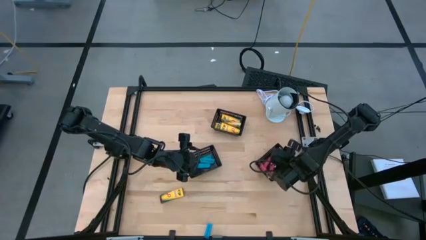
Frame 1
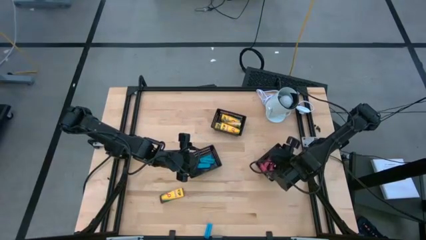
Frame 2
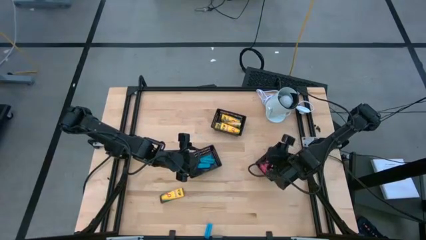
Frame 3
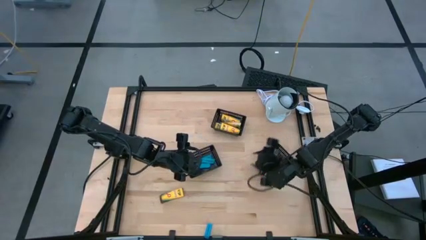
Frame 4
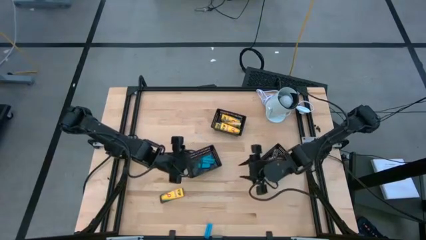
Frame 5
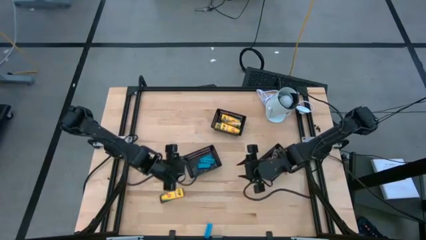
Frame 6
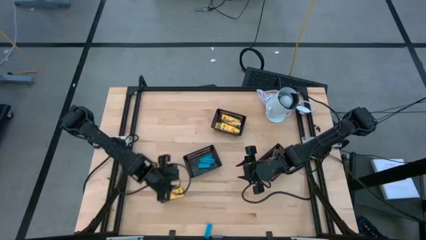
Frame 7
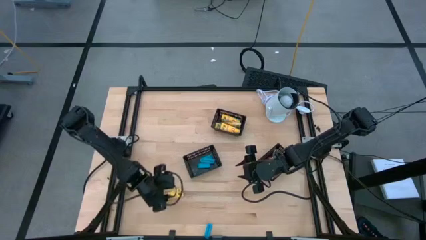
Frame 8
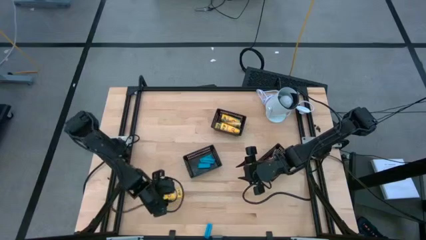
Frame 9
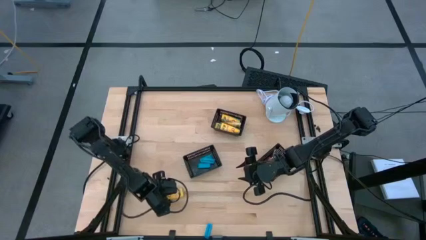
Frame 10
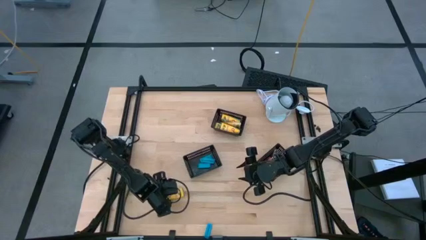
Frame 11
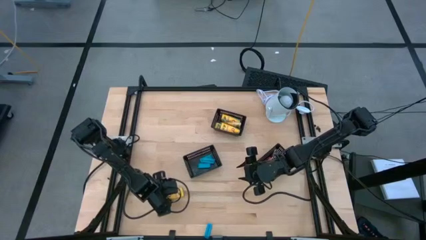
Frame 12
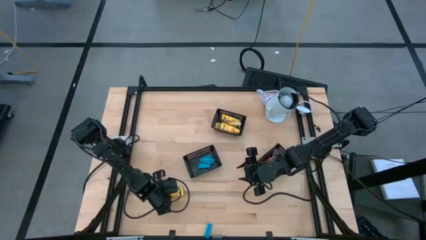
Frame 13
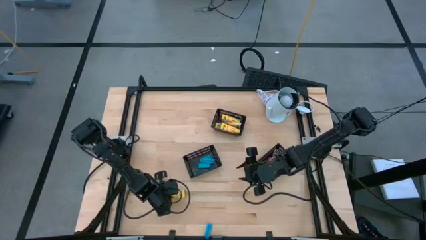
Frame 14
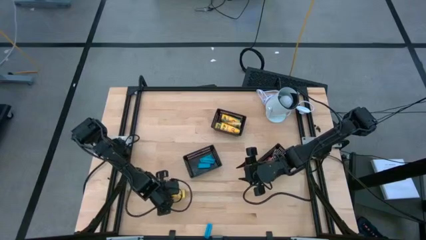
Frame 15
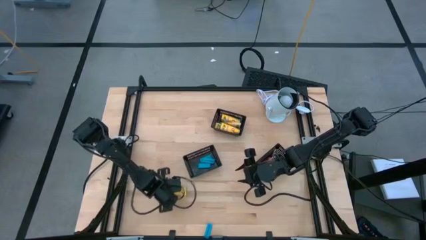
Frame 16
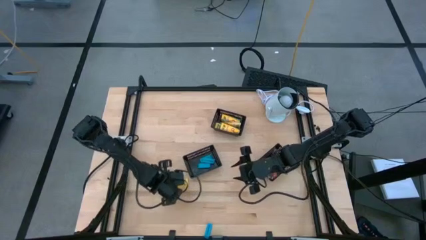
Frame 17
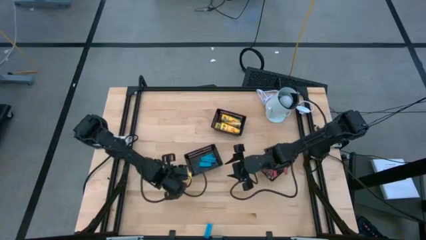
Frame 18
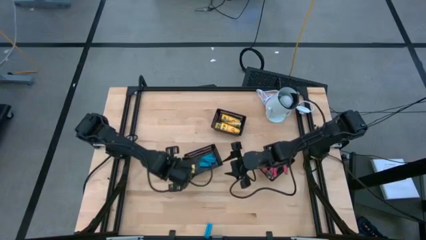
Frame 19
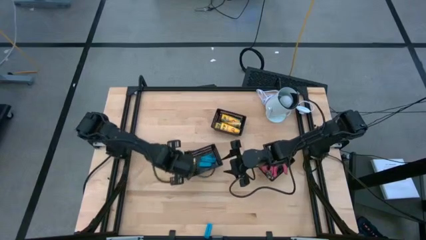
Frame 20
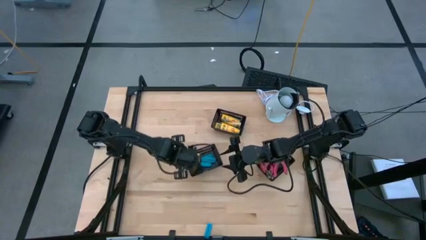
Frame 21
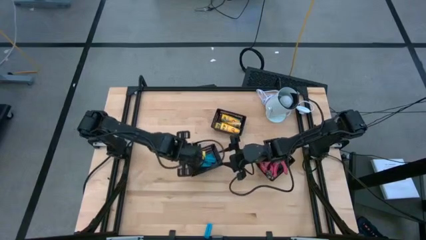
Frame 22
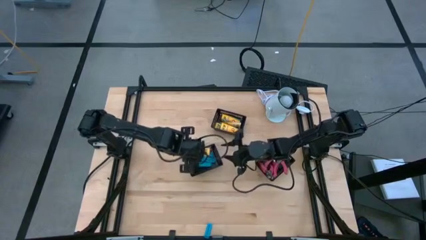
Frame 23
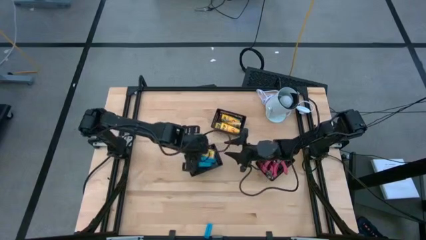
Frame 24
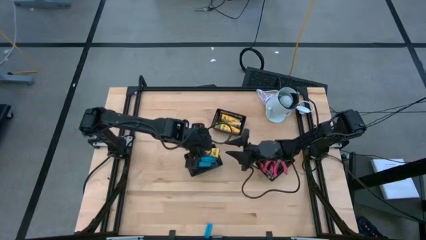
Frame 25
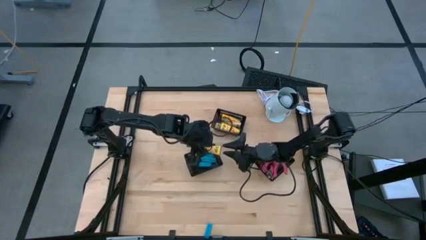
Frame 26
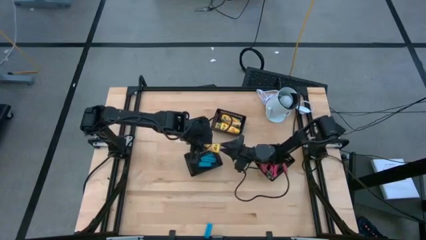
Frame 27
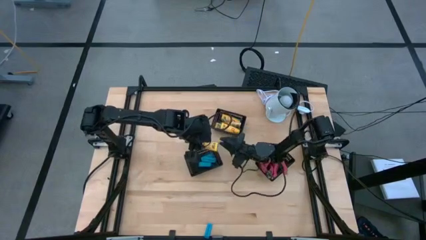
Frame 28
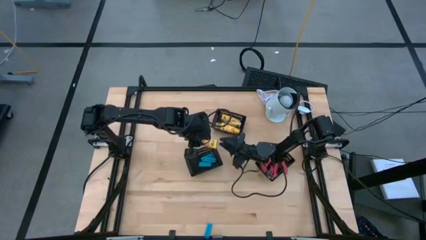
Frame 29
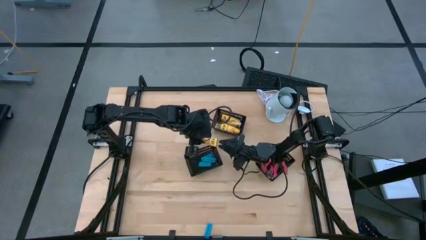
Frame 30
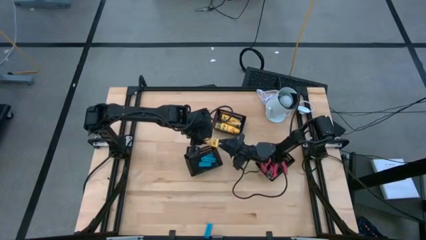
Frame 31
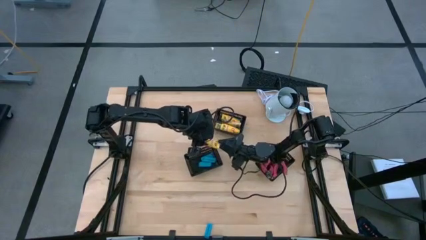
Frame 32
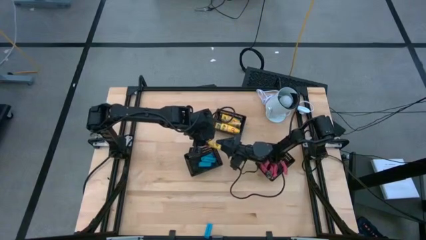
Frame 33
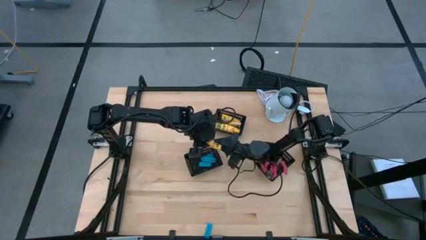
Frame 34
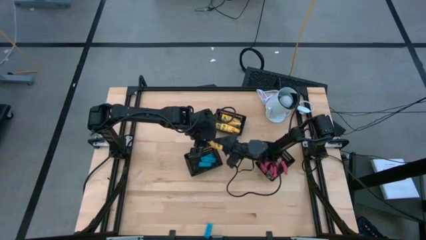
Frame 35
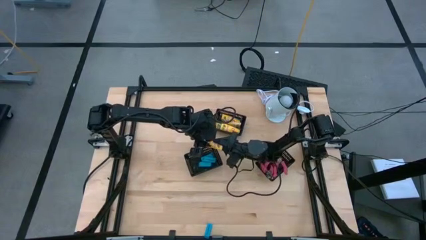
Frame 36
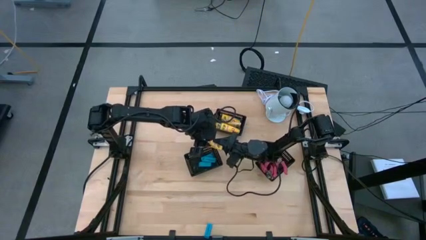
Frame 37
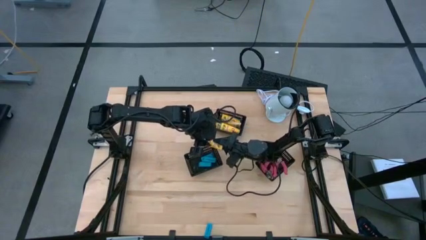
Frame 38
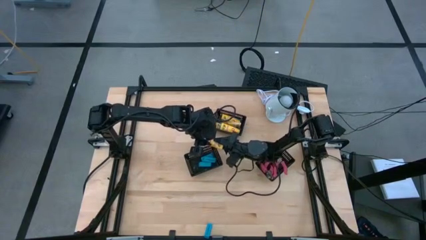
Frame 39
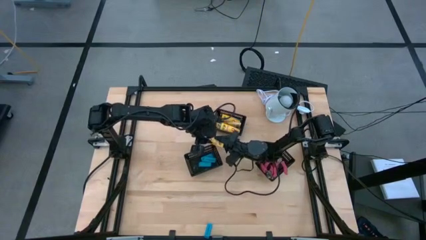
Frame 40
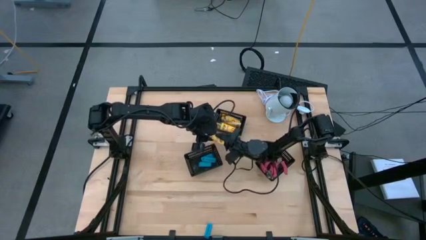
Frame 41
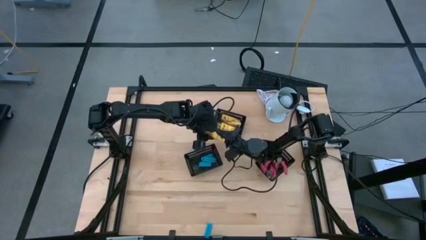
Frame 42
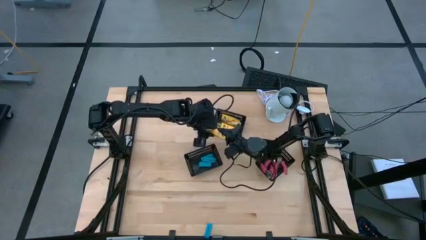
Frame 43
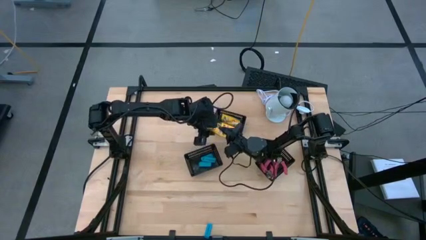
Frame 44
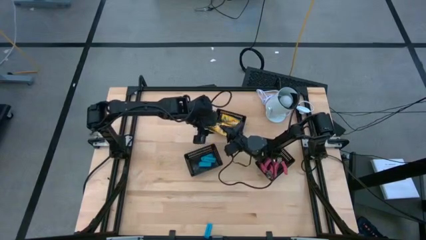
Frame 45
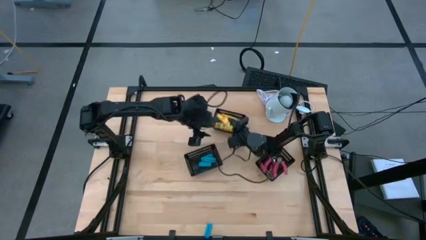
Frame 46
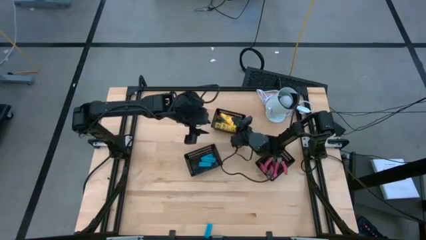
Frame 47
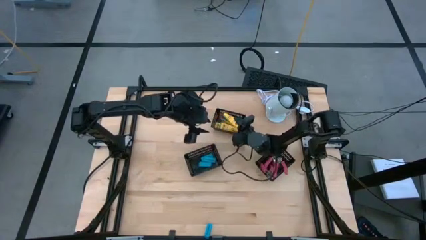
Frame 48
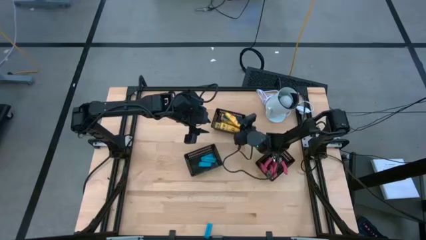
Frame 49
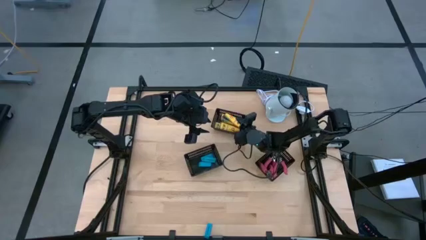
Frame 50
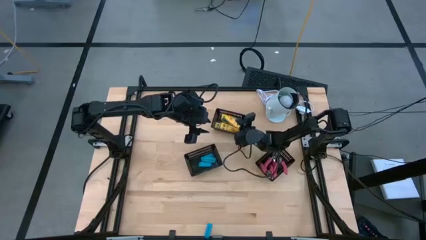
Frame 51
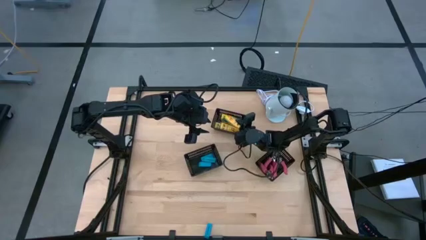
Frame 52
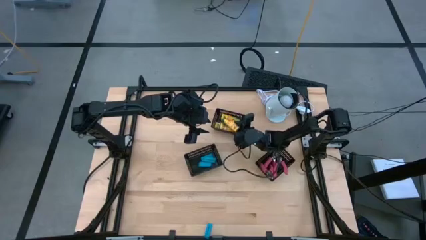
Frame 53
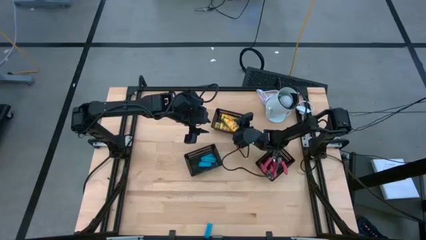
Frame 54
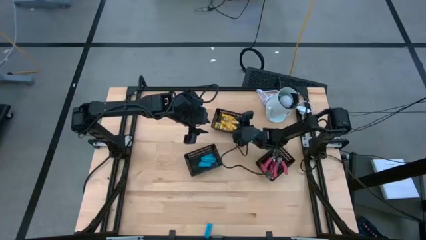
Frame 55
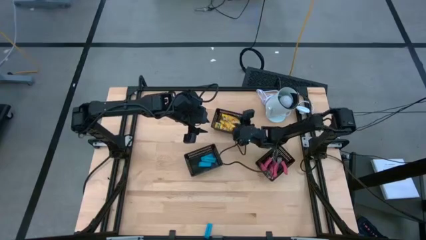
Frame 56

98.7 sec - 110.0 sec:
Task: Pick & Place School Supplies
Put the yellow crayon box into the top black bin

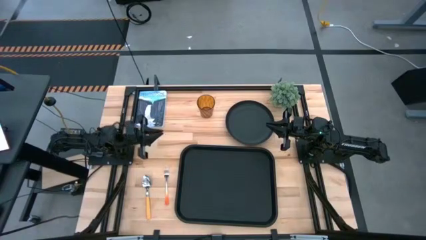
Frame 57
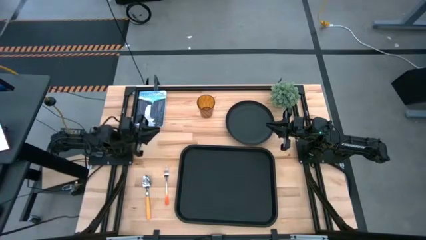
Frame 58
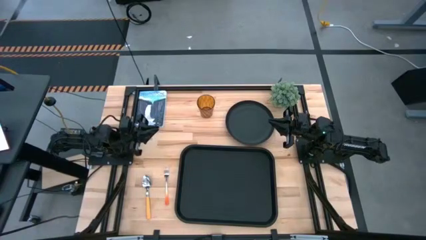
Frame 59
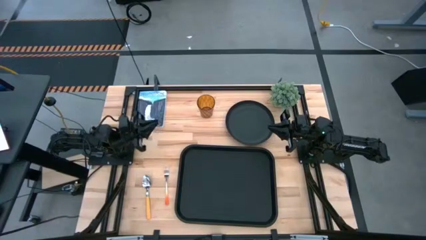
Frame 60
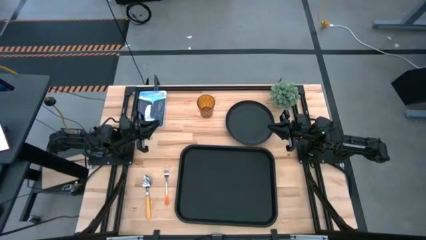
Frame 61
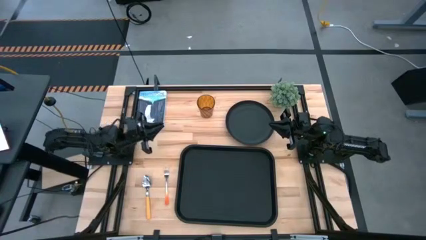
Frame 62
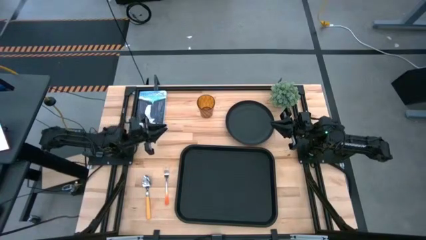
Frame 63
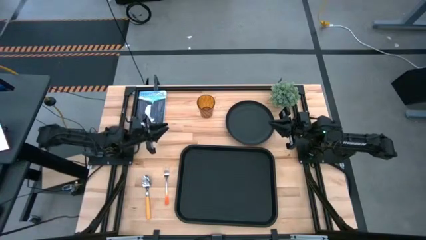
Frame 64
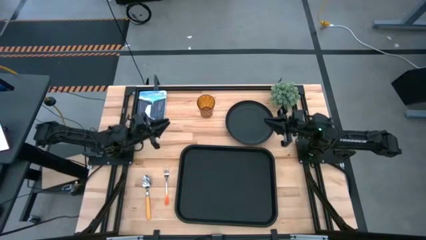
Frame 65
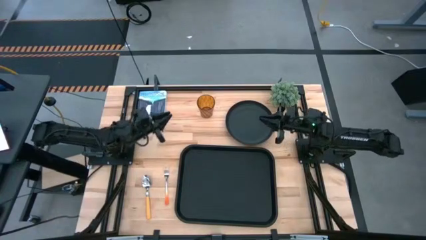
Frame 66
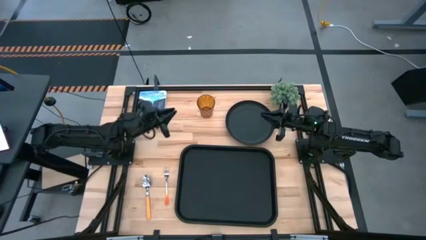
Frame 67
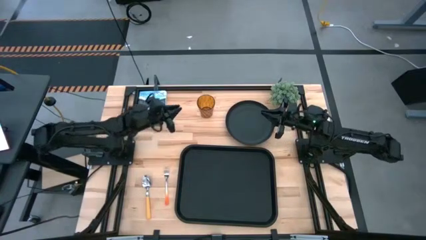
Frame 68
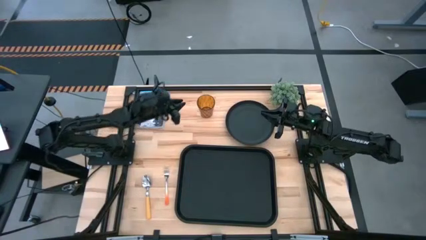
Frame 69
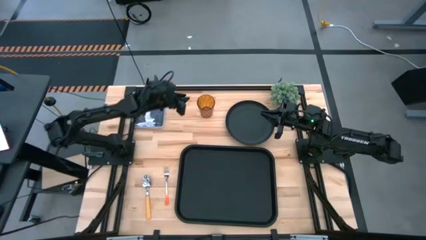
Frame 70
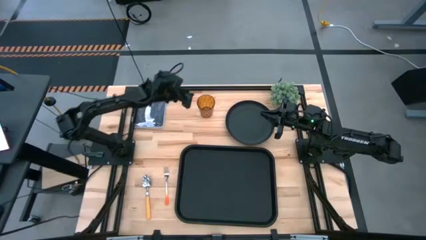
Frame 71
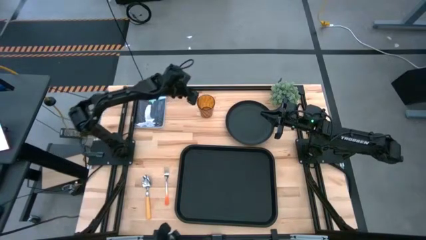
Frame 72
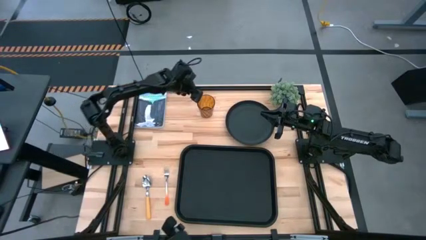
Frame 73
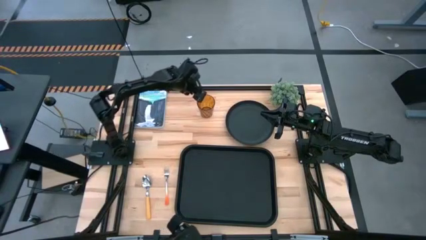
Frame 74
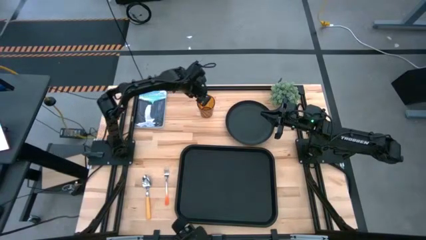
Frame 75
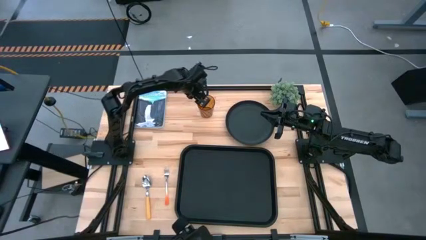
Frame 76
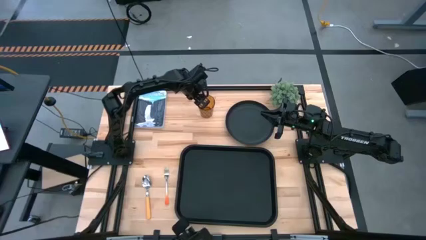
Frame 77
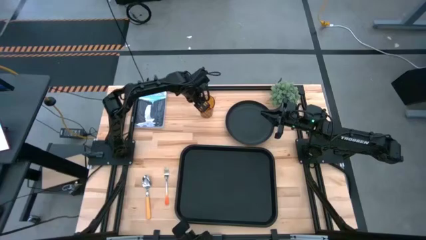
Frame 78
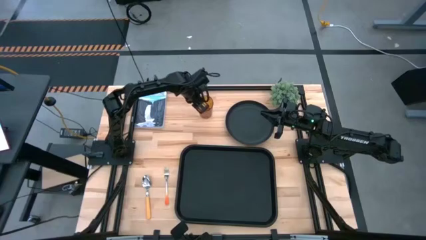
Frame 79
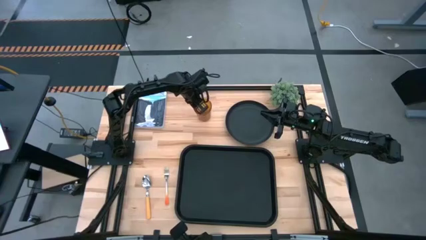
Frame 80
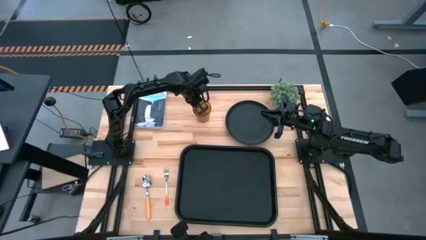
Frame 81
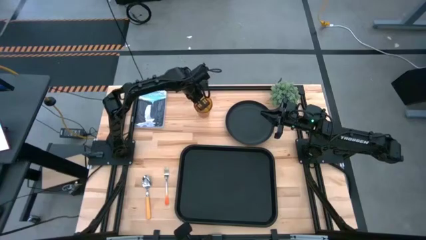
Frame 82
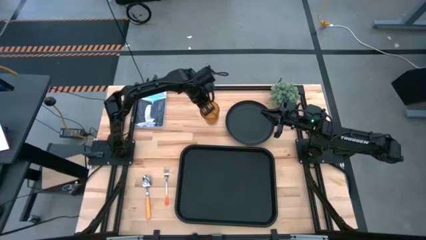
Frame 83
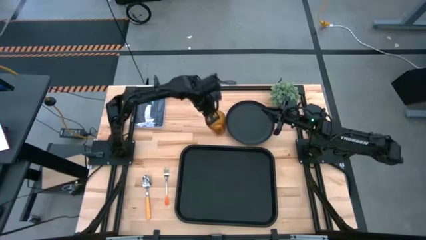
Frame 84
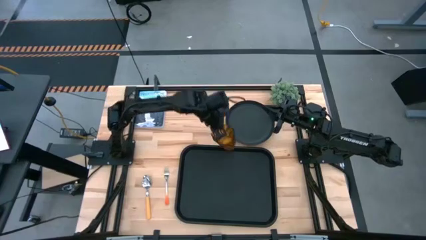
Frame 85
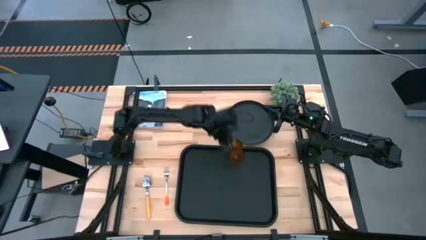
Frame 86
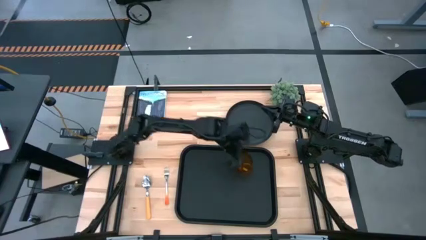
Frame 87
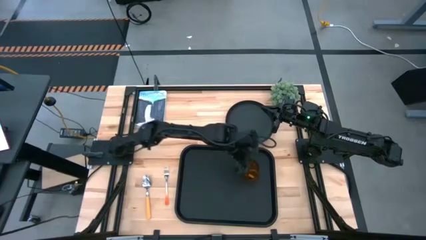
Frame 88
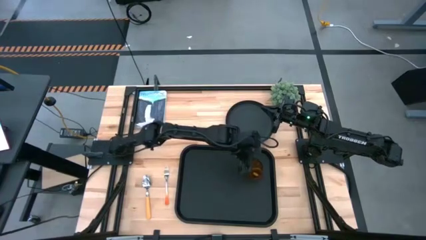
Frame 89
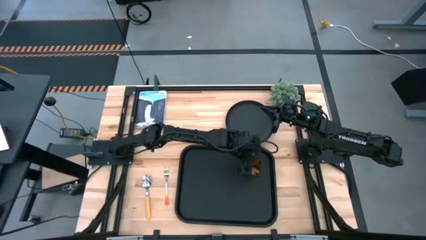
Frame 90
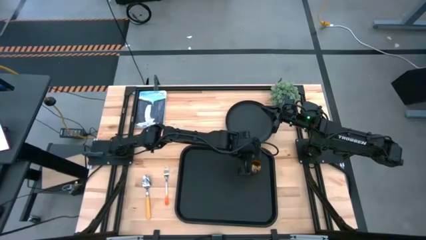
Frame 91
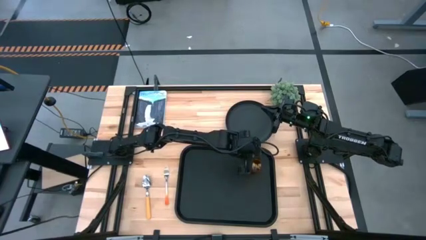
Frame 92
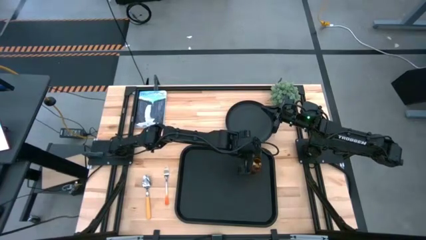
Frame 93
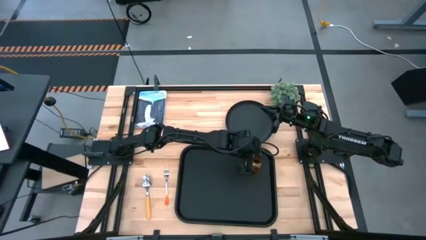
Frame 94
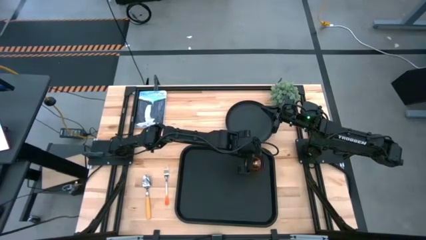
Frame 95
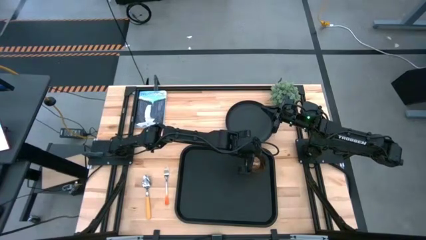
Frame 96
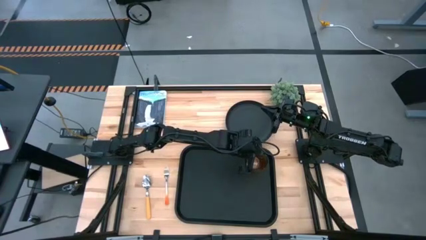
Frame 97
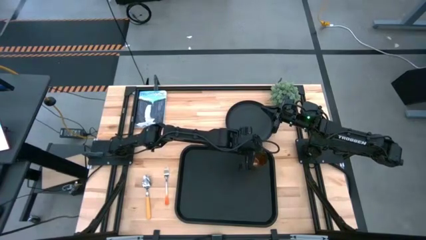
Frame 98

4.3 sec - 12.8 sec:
Task: Pick and place plate/cup/fork/spoon on tray
Put the brown cup on the black tray
